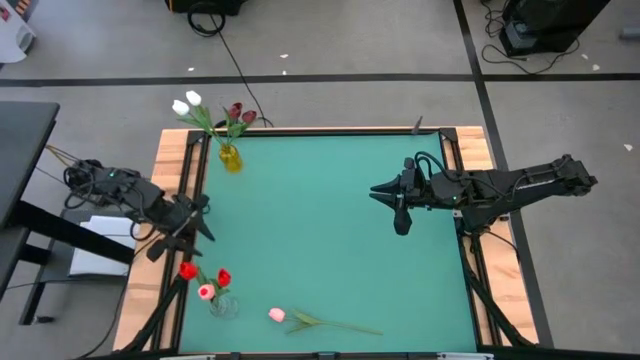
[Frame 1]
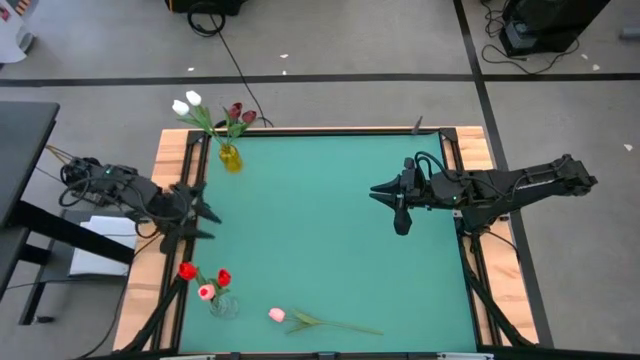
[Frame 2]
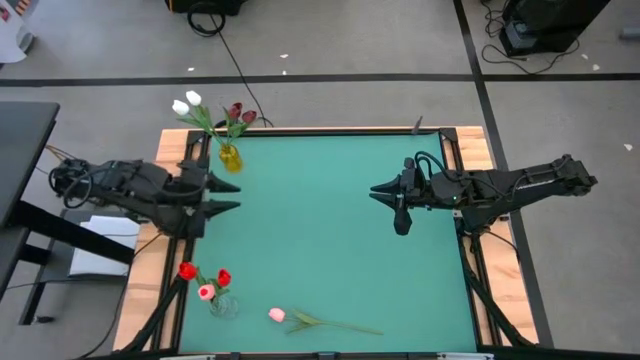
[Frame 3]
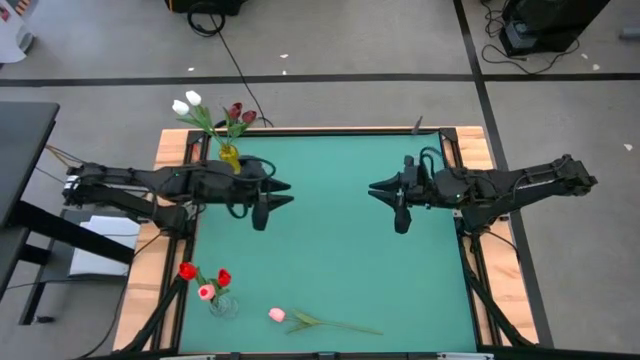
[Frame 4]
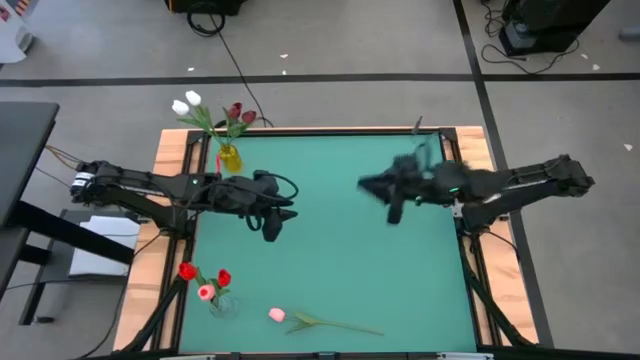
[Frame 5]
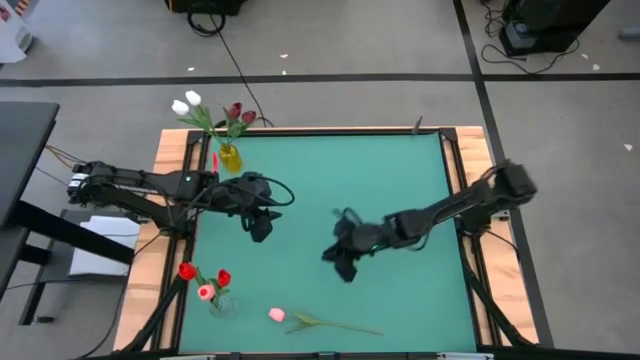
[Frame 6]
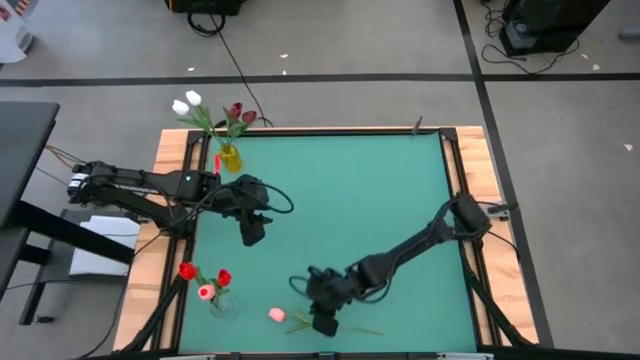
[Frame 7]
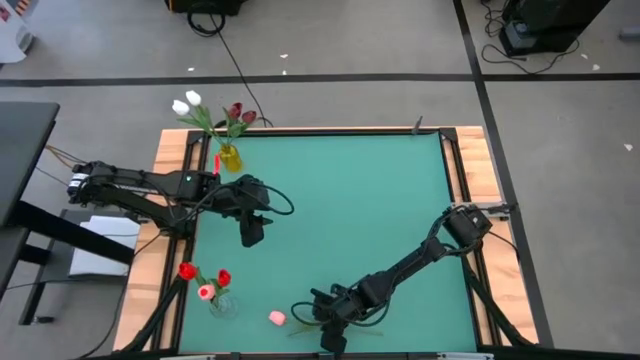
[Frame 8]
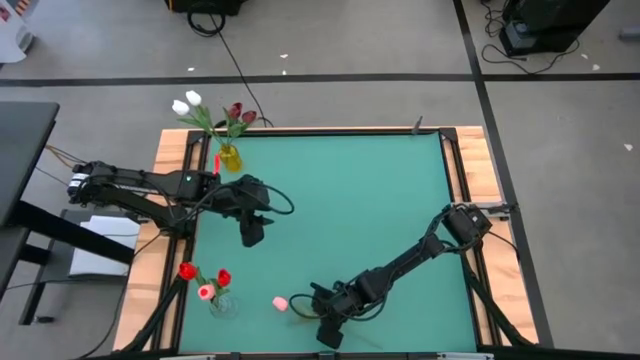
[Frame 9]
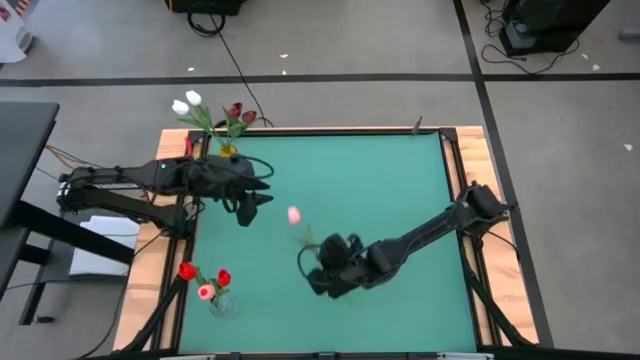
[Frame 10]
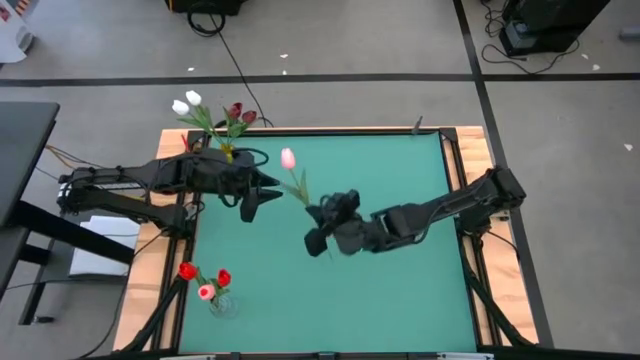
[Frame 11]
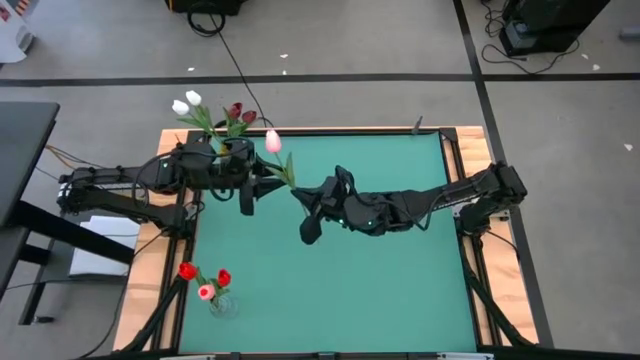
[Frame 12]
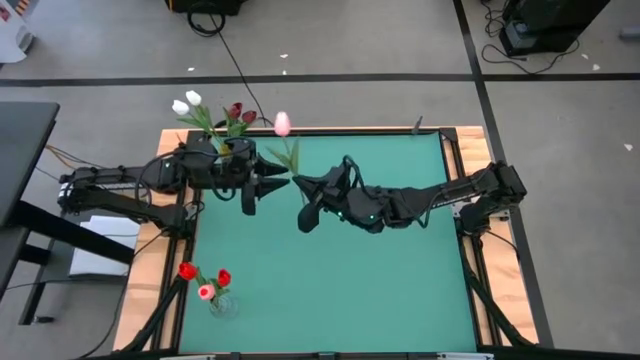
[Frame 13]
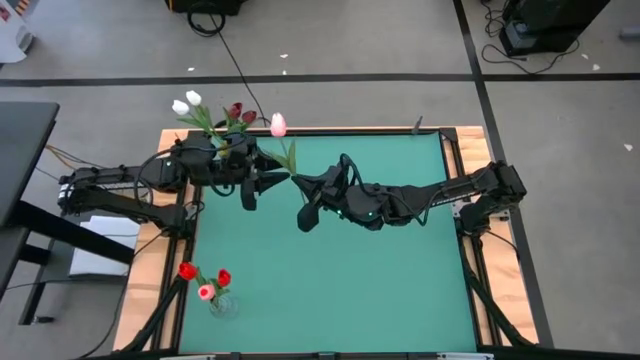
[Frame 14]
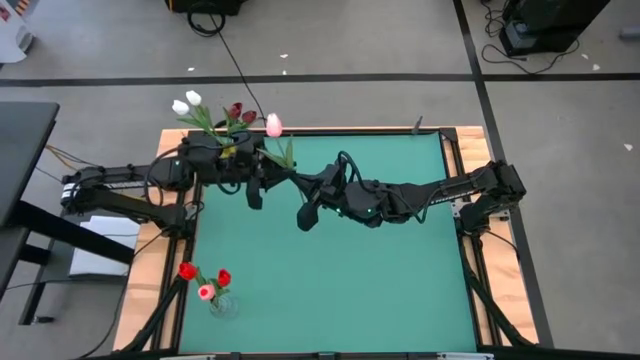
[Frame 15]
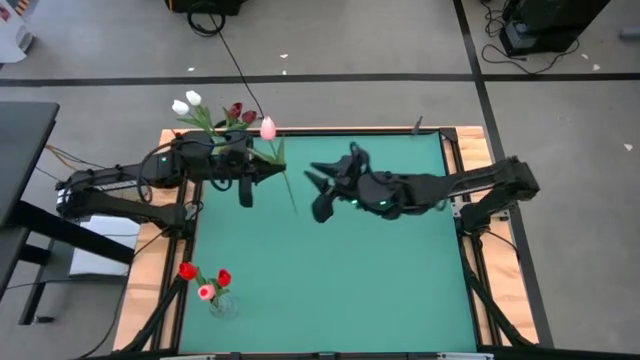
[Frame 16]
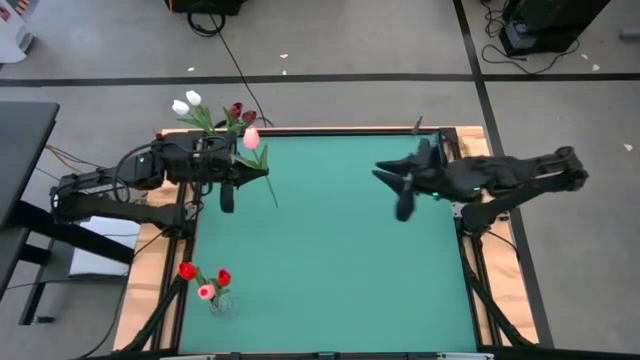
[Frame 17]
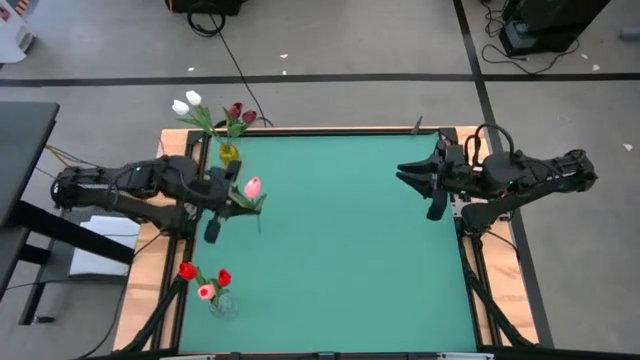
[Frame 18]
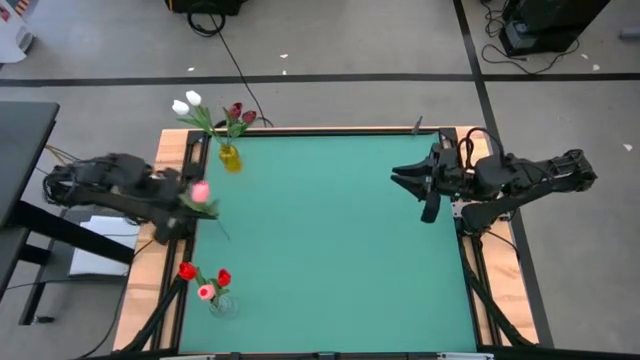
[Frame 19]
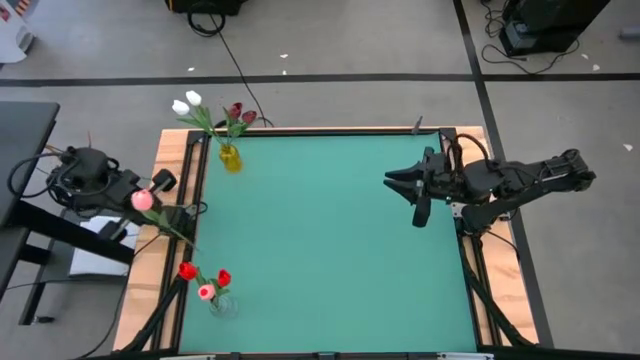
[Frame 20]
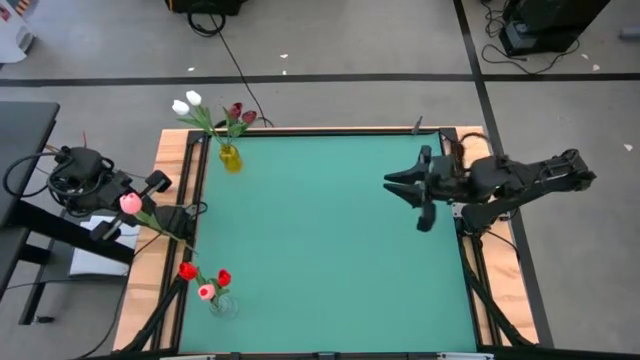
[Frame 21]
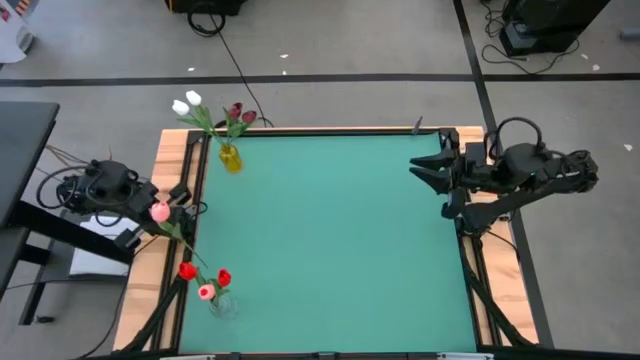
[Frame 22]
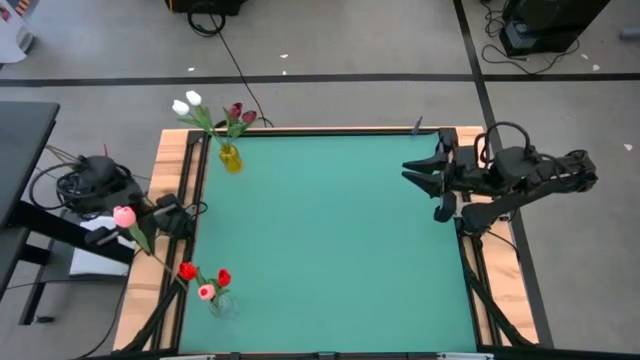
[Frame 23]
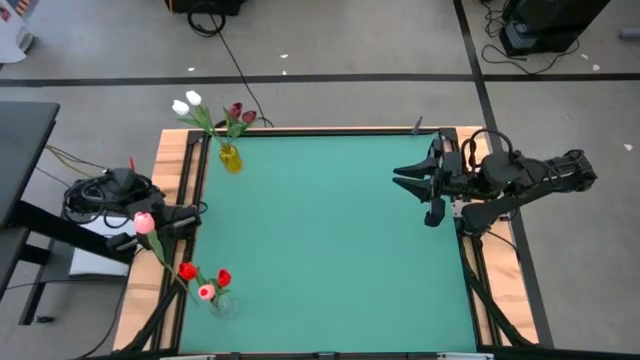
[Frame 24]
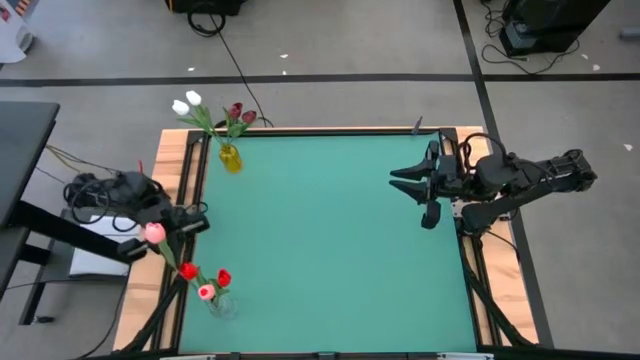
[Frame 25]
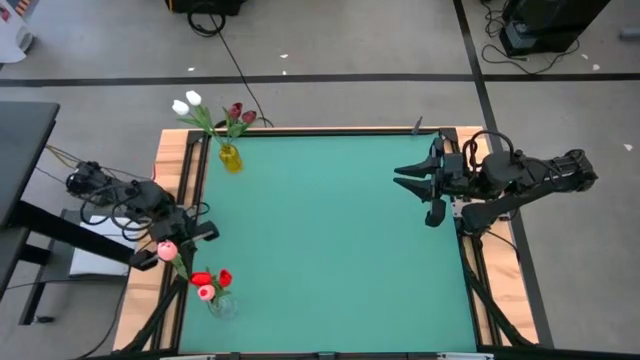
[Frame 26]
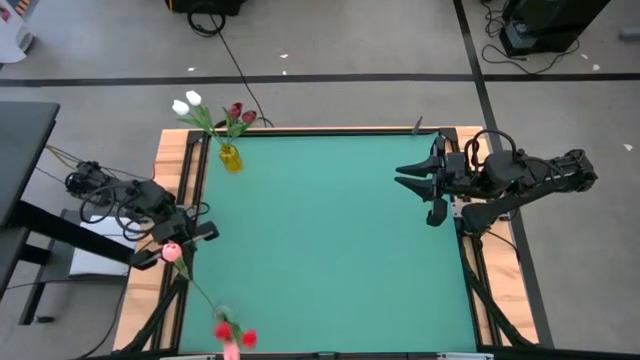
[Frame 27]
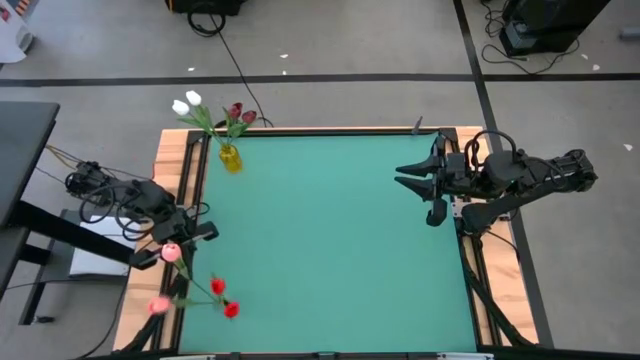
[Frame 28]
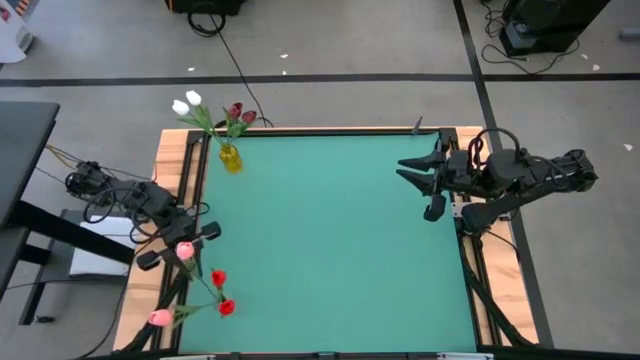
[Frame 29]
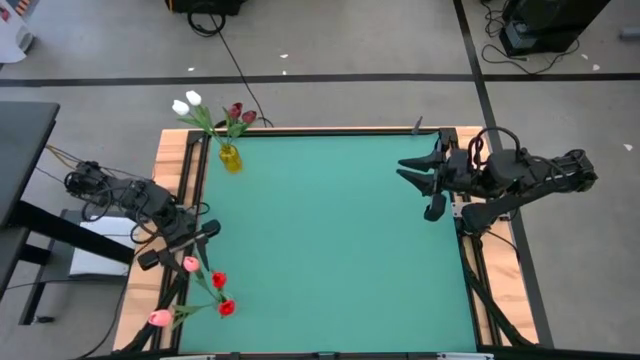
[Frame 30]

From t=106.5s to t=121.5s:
Task: Sort flowers into vase by color
Put the pink flower into the transparent vase

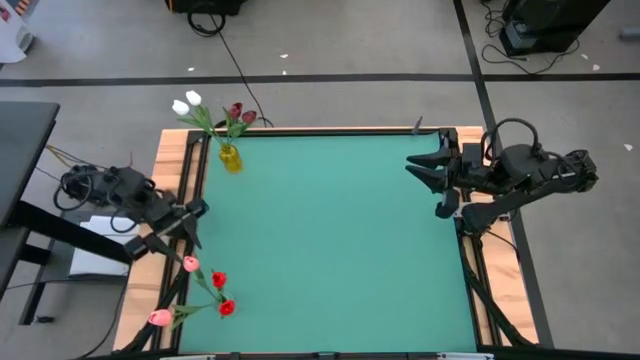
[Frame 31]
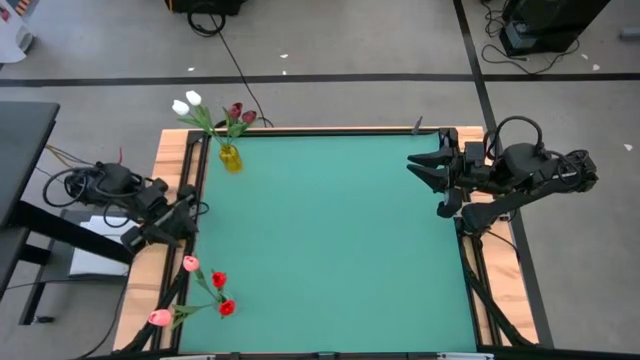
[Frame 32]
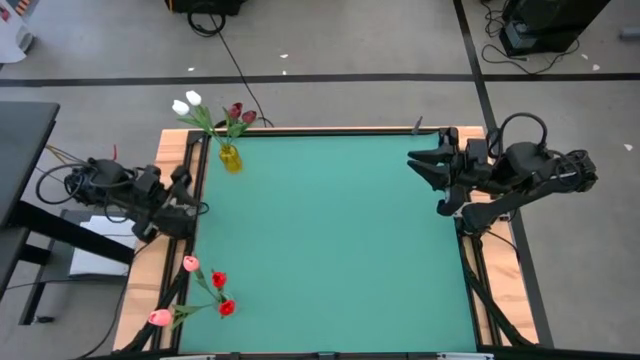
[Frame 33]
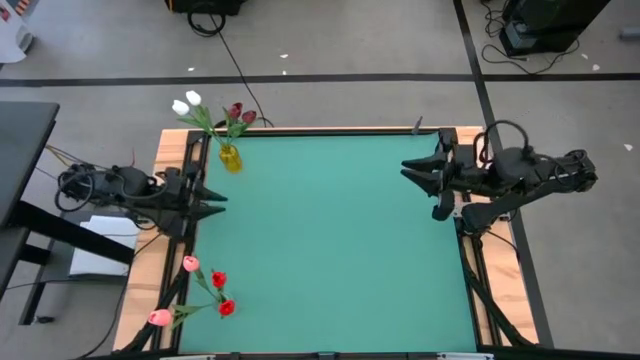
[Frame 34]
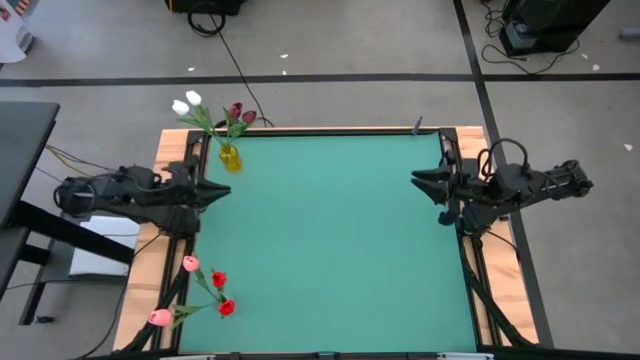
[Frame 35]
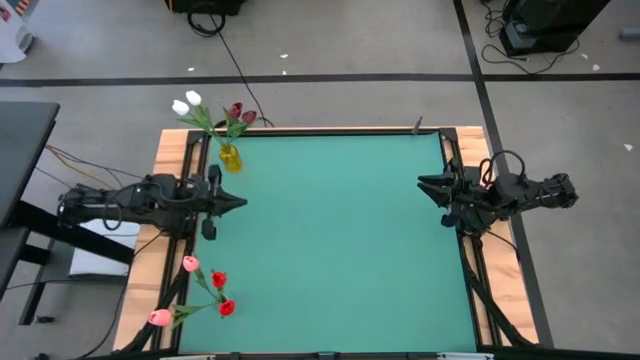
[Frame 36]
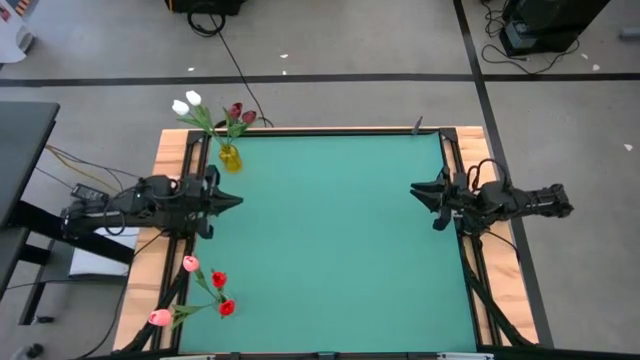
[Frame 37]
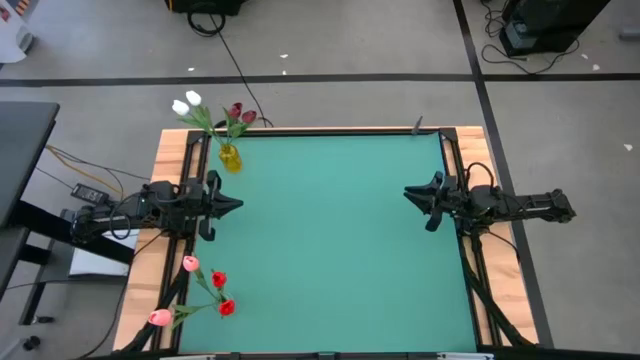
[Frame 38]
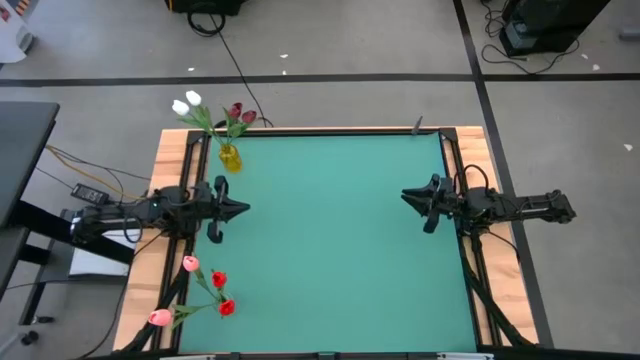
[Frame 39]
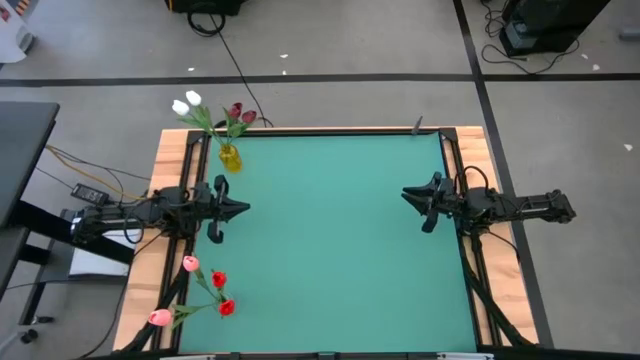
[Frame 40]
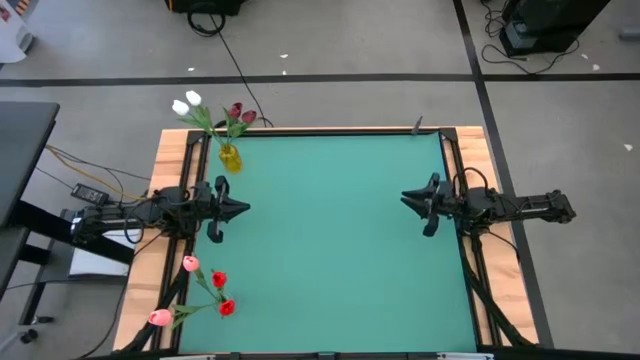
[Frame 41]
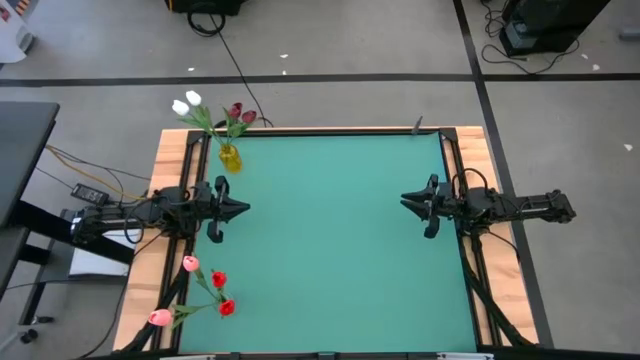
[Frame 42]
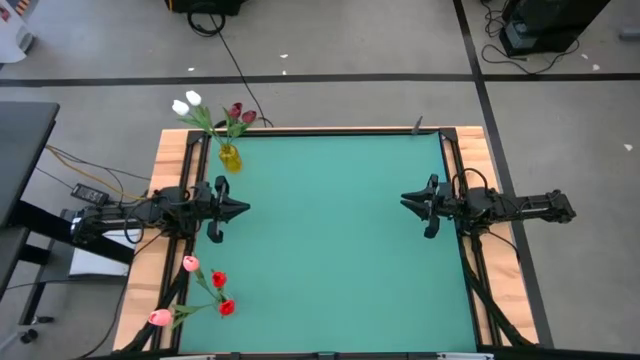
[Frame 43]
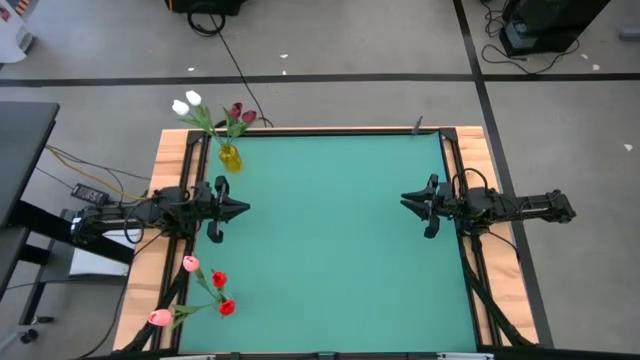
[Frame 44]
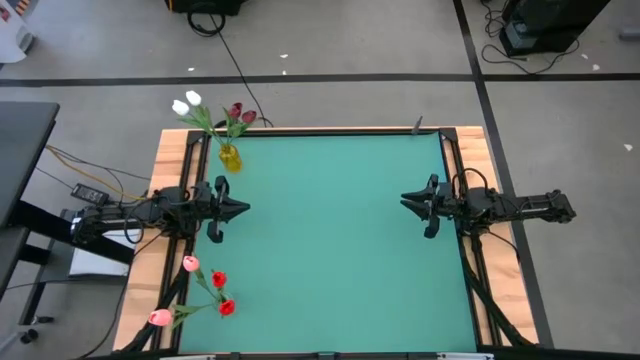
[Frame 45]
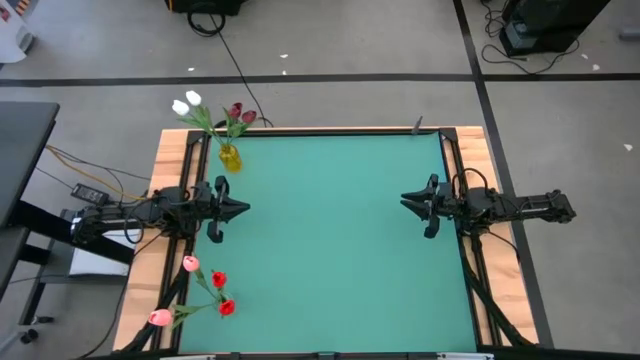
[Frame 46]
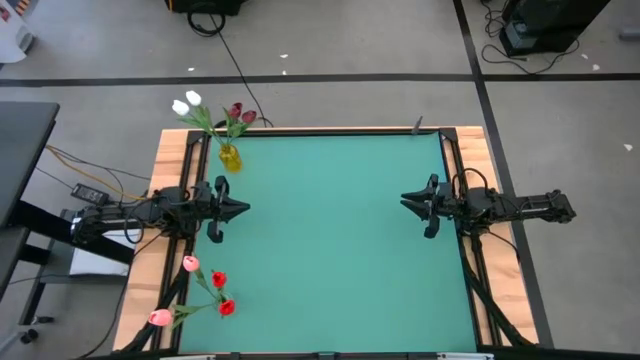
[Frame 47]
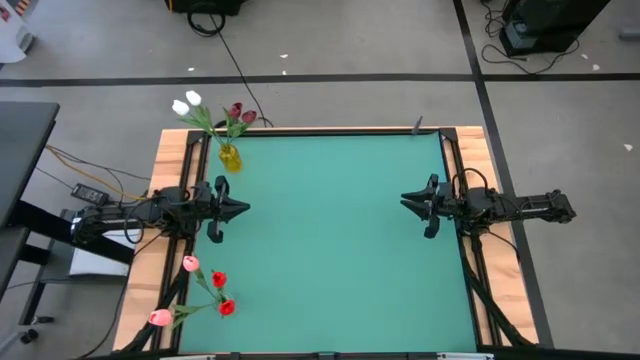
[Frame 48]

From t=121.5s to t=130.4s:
Return to Home Position
